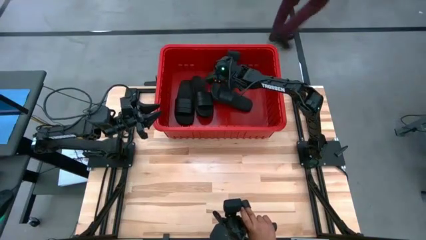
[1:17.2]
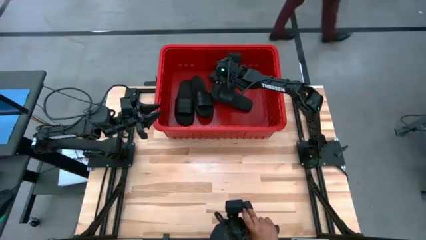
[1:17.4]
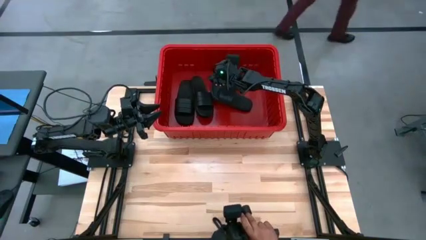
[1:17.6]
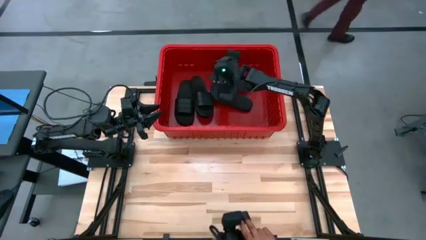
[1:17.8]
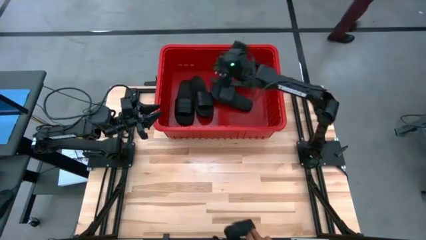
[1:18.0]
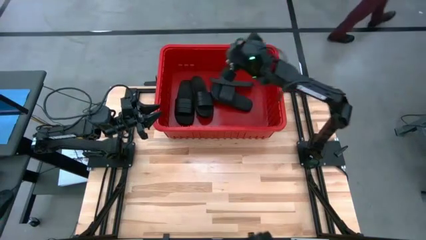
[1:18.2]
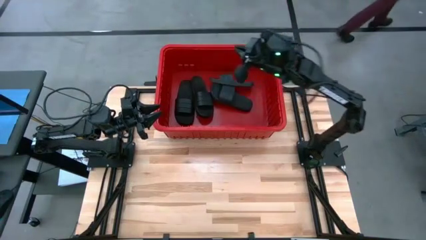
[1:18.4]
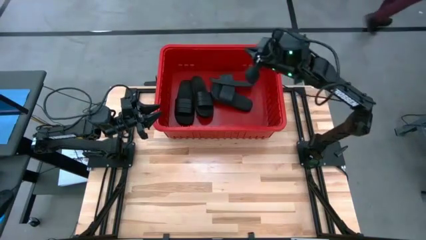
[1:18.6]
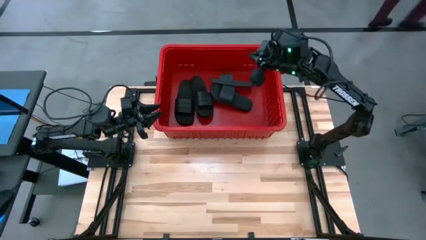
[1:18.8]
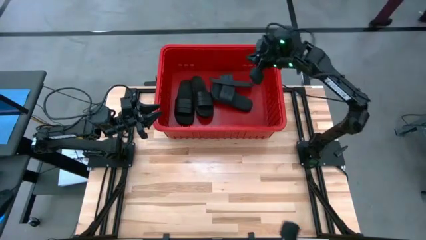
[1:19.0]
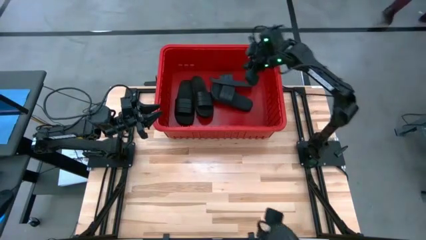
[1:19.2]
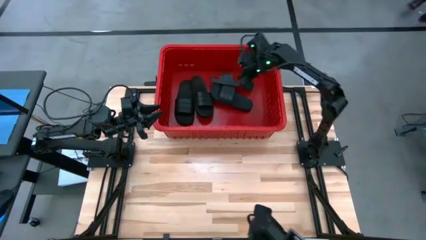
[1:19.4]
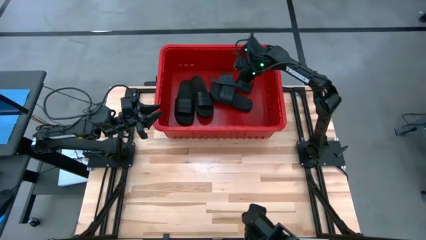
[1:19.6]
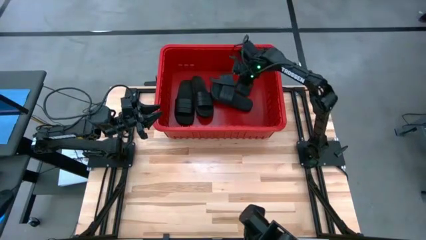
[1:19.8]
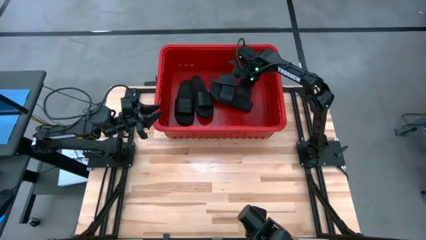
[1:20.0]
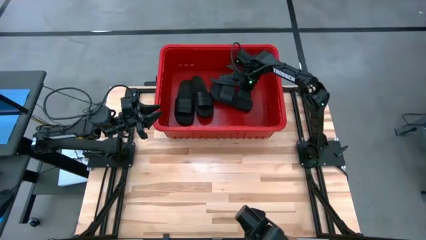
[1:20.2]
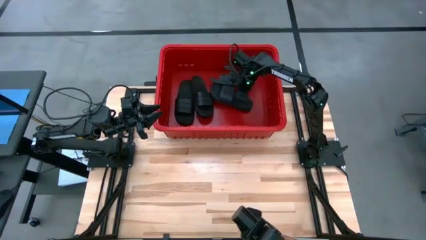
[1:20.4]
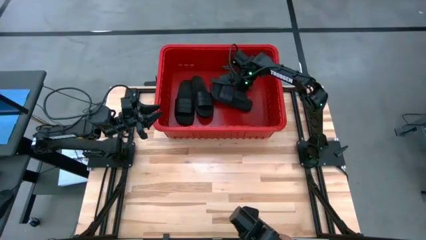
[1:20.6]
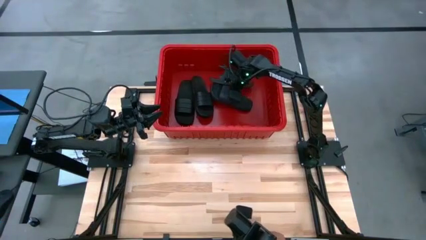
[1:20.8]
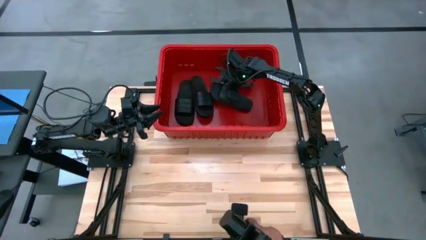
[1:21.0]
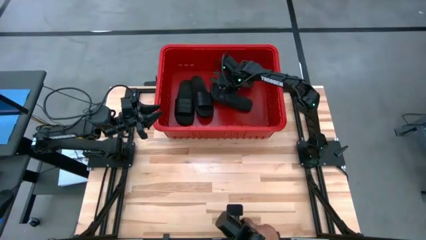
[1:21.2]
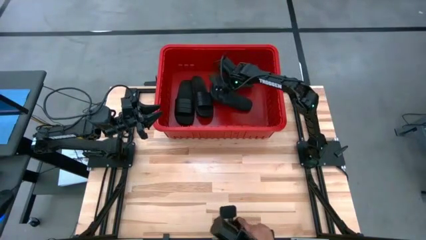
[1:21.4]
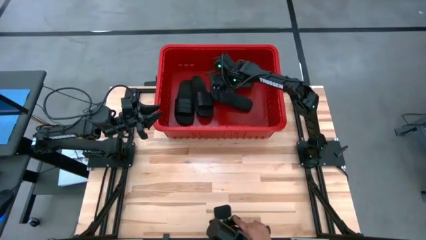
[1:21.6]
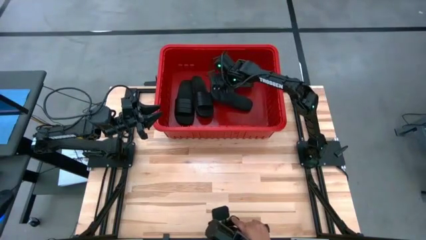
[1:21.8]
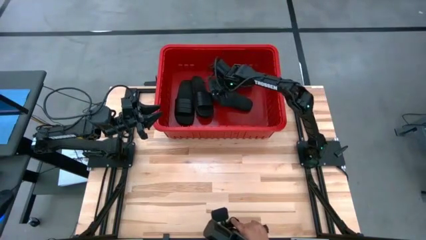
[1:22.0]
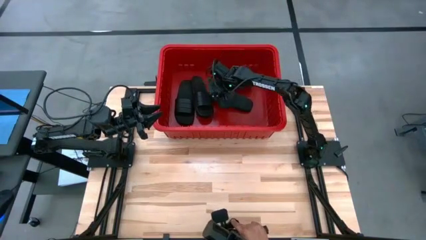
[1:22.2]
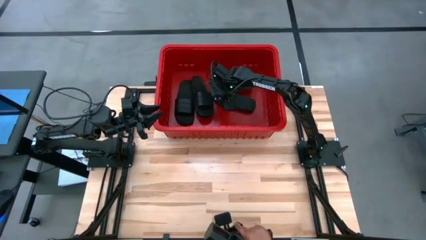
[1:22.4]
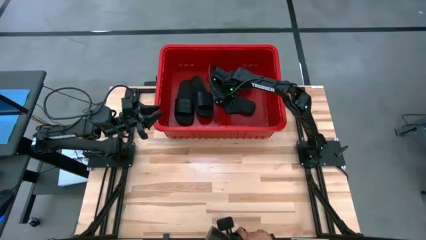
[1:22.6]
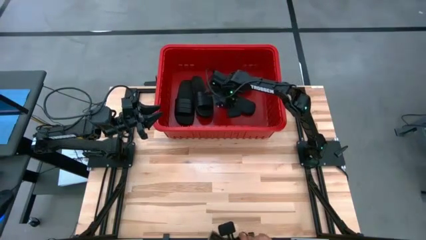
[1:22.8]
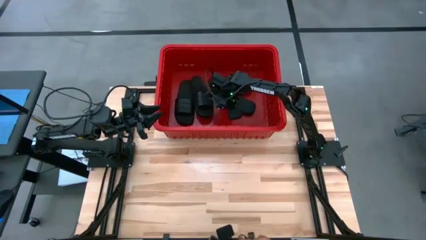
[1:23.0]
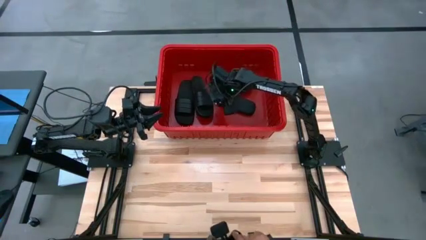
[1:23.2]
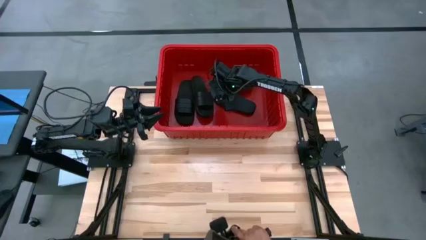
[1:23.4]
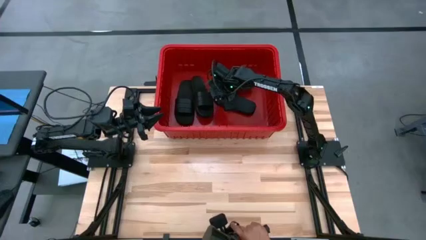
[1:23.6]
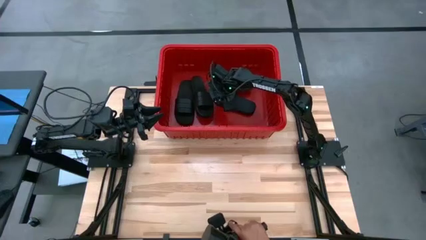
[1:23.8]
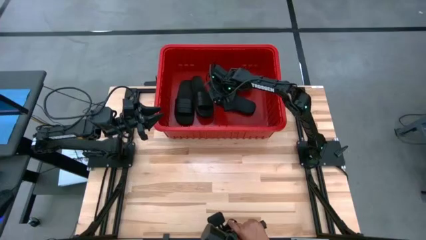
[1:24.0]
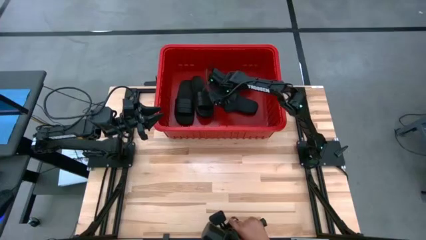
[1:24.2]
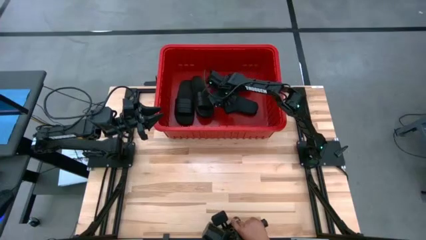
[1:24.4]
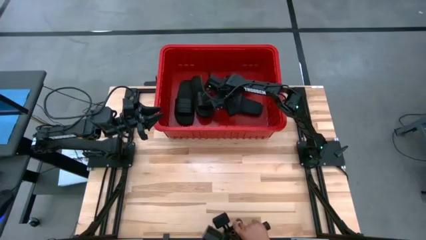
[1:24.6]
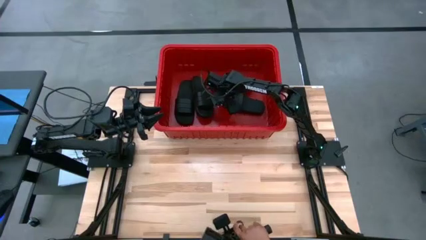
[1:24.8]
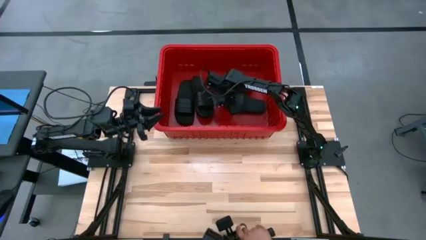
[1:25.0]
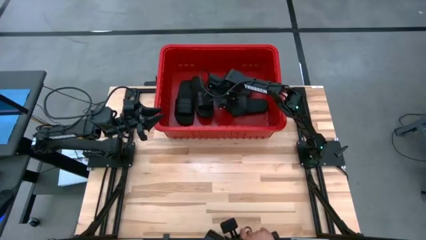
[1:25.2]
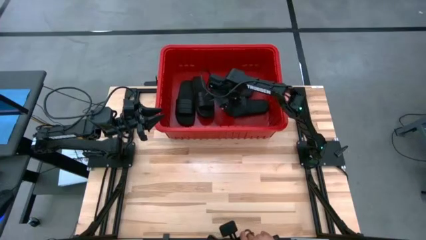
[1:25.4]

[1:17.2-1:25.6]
Task: Pick and place slides into bin
Adjust the slides in the red bin

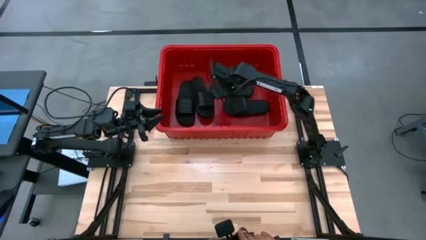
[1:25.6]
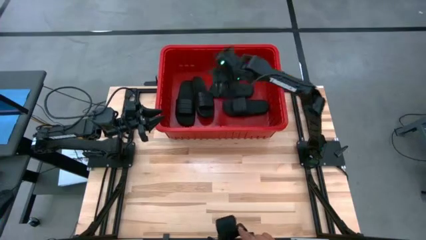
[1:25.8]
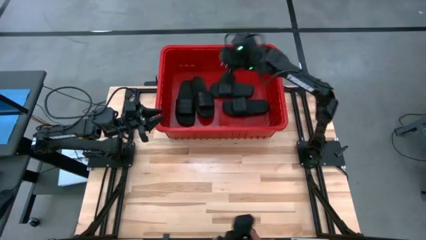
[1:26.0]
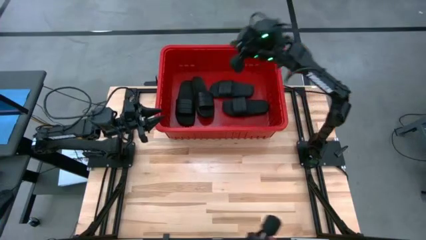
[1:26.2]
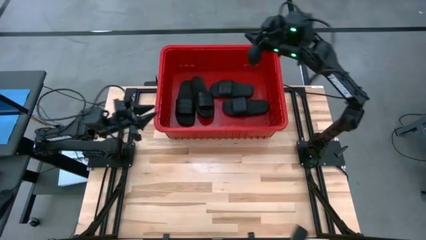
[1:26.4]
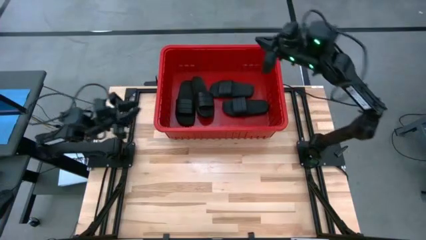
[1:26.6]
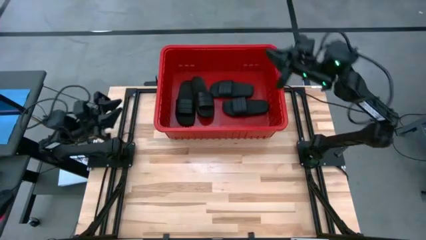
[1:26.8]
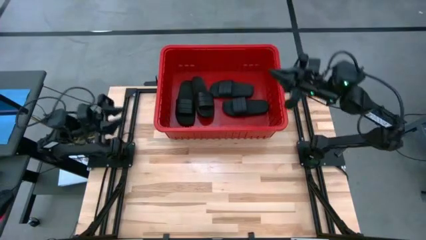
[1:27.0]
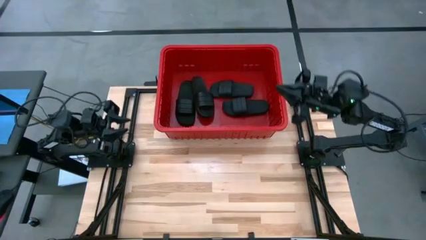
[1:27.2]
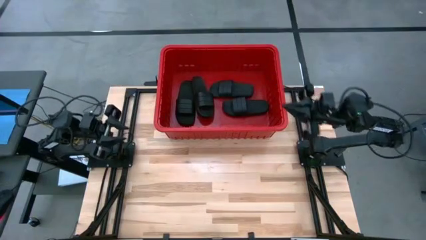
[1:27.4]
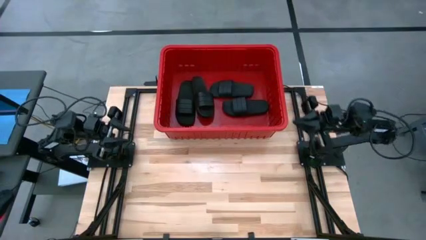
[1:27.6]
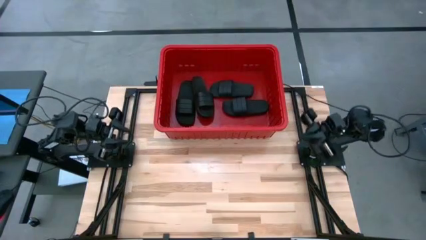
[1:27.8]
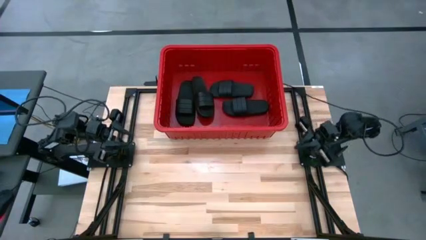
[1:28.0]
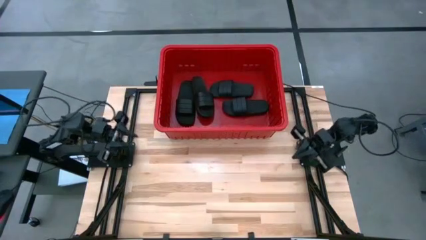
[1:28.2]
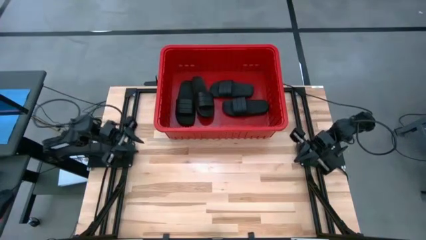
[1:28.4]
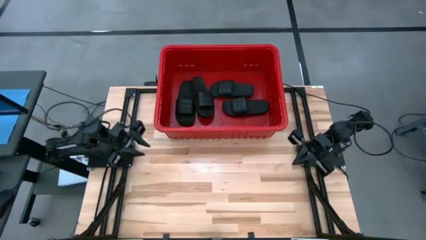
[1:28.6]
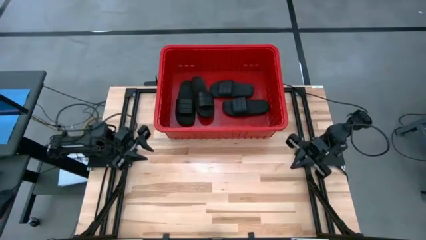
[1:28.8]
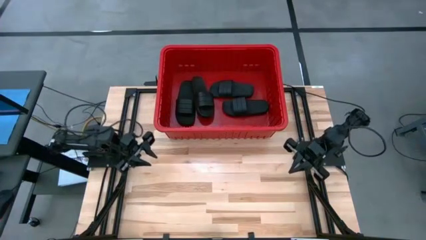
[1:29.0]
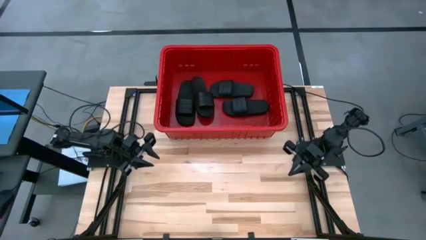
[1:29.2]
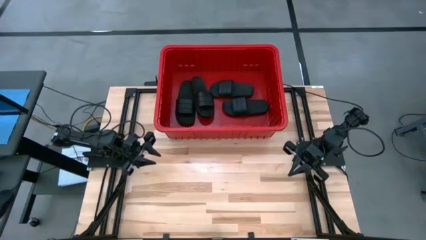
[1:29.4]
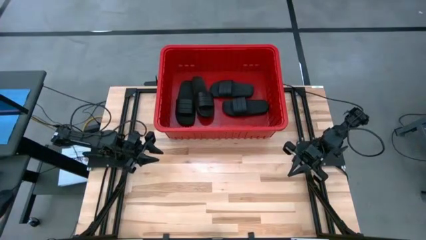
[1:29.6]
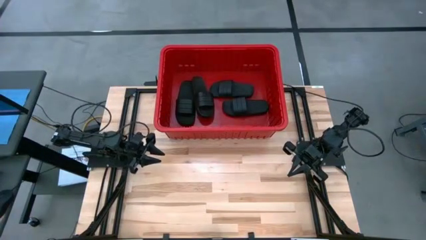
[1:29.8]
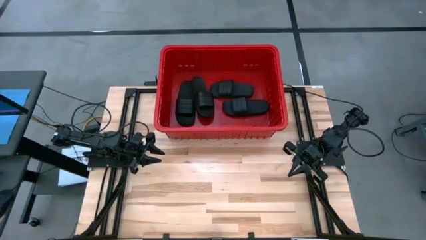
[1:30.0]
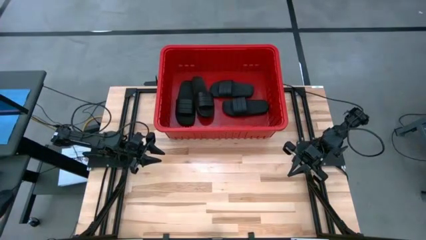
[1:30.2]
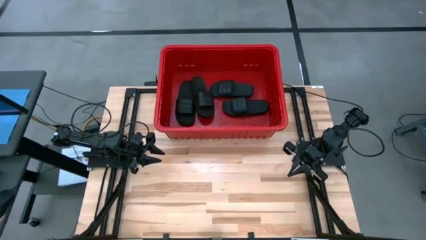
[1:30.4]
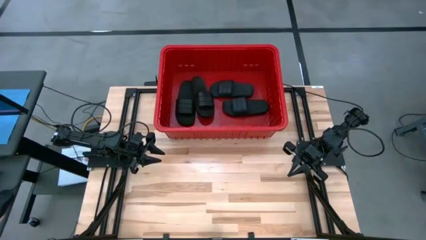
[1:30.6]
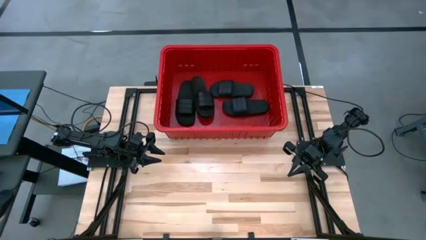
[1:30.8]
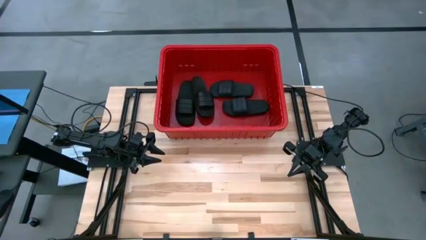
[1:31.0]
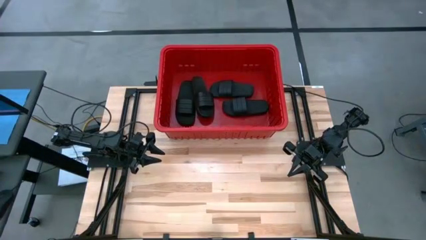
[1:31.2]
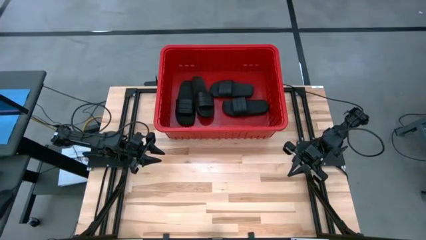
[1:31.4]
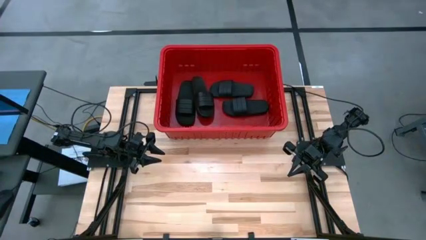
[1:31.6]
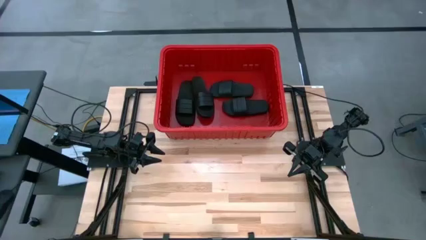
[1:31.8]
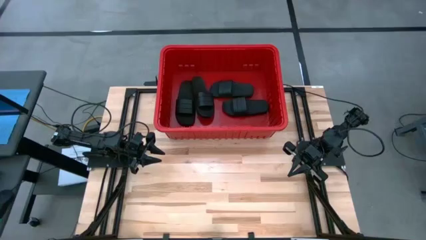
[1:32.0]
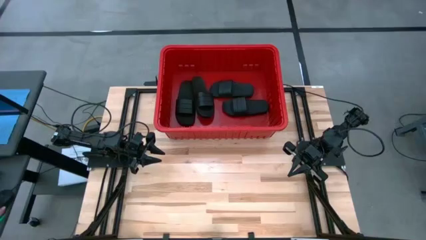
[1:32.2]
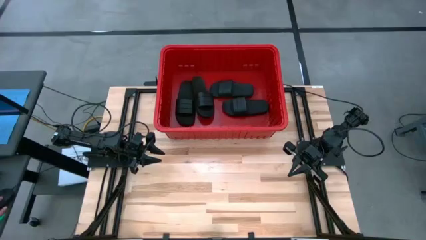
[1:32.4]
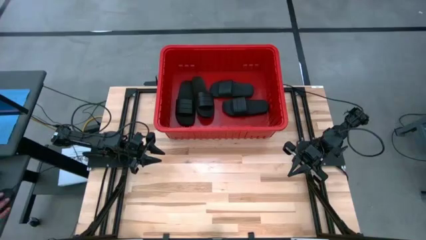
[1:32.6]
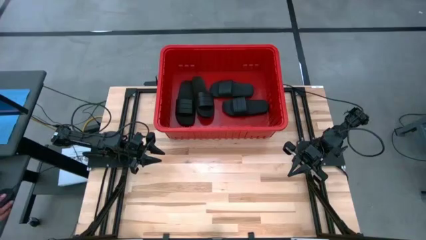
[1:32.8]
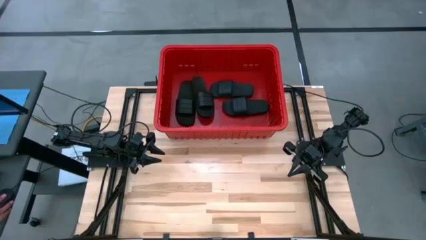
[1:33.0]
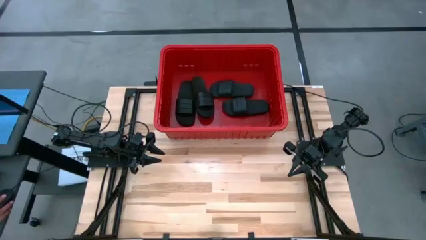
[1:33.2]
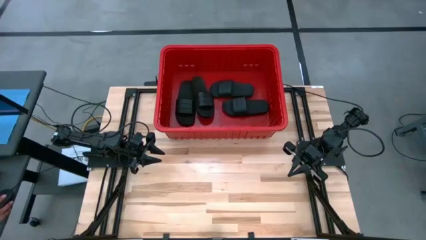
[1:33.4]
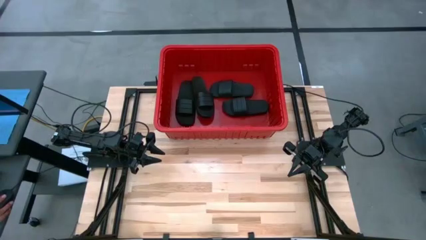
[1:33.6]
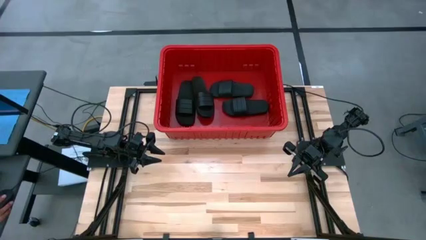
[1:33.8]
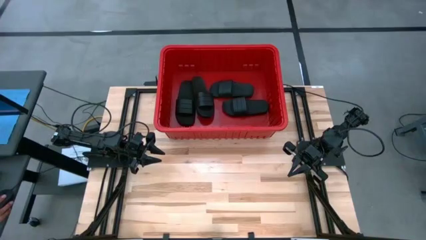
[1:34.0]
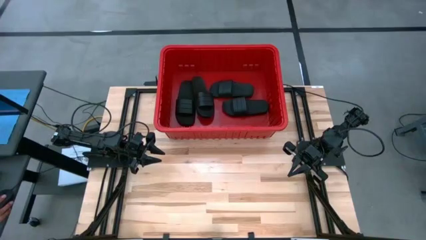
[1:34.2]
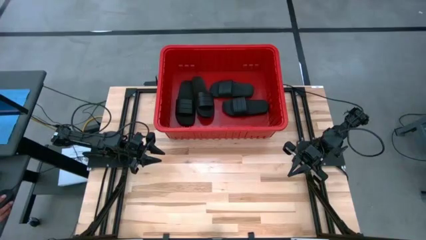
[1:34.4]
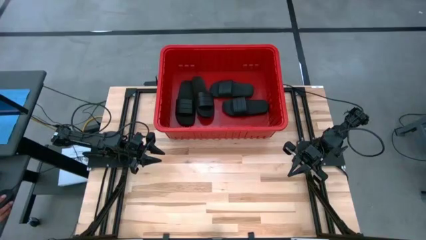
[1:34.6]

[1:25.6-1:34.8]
Return to Home Position
